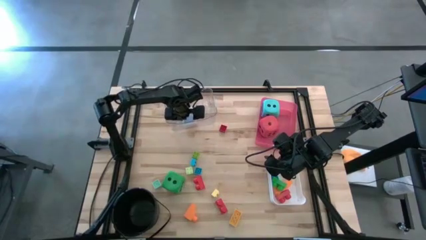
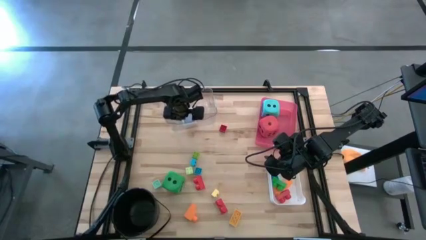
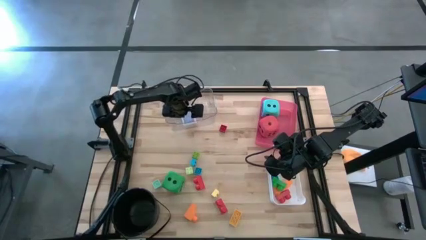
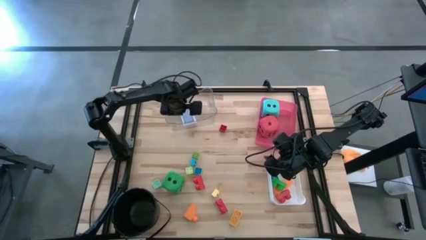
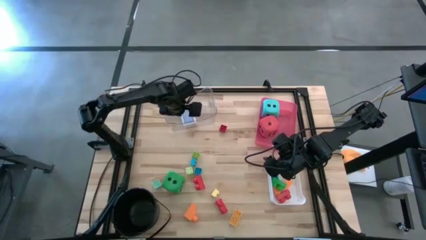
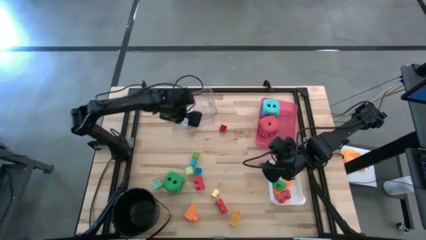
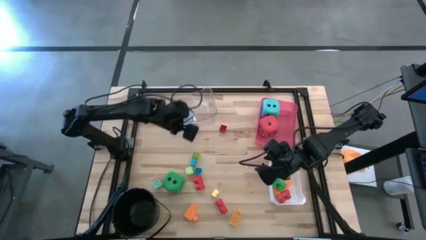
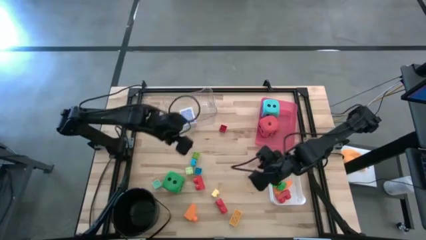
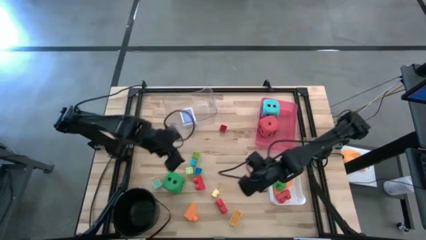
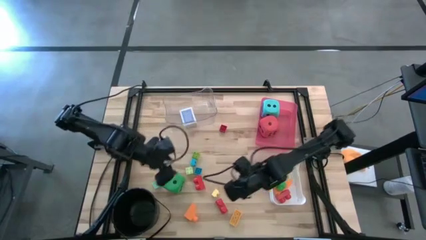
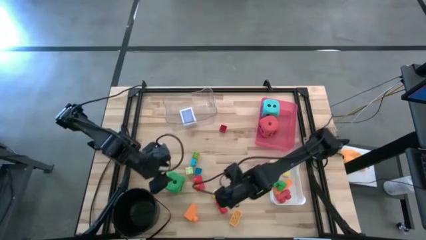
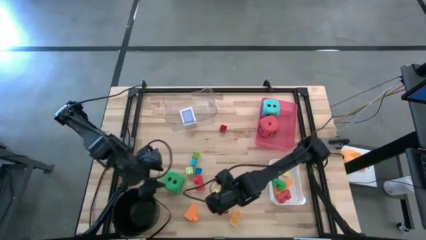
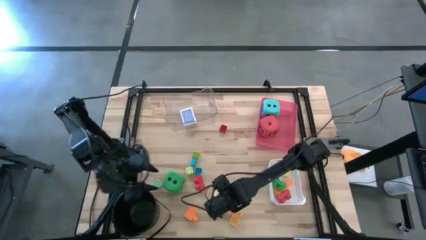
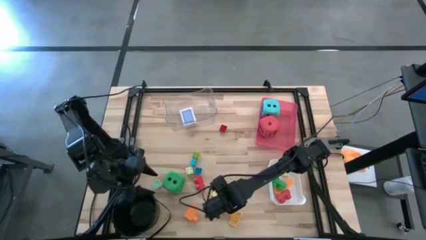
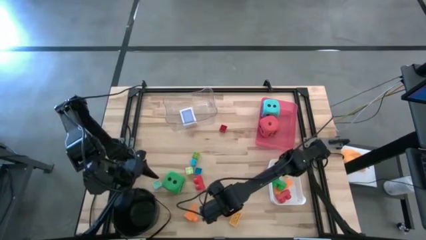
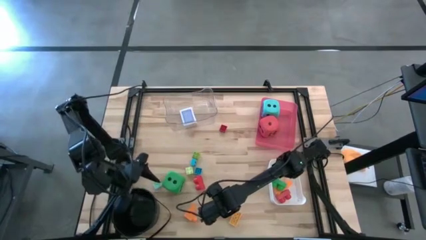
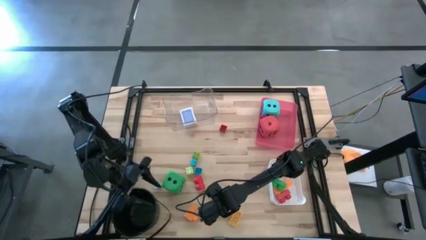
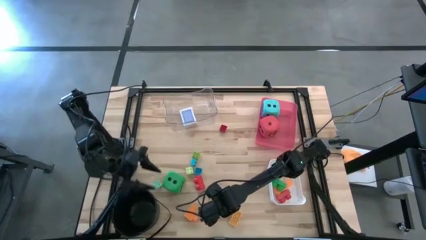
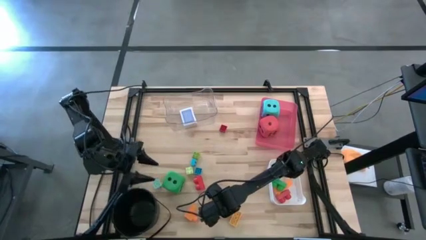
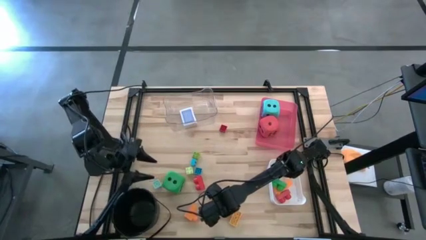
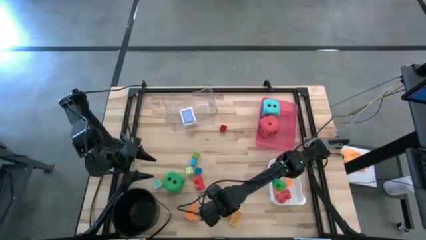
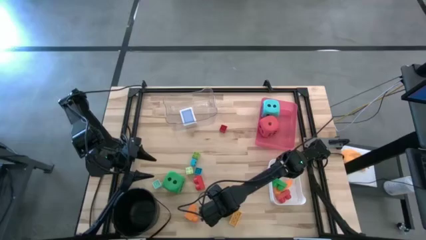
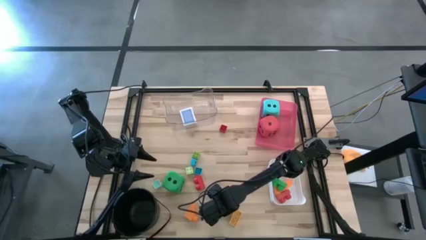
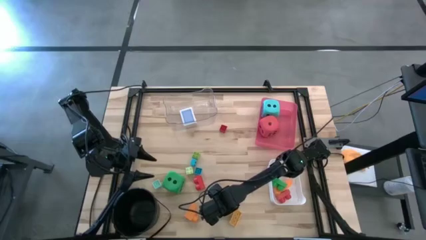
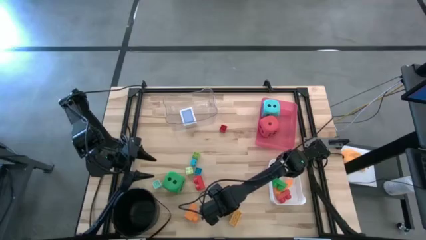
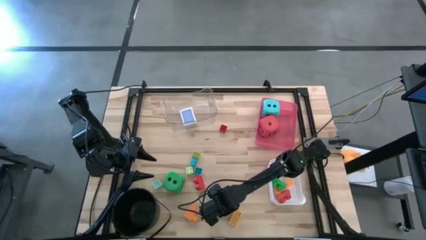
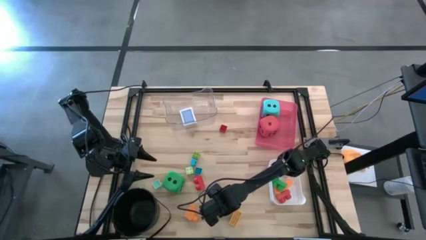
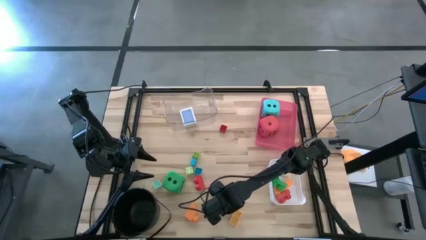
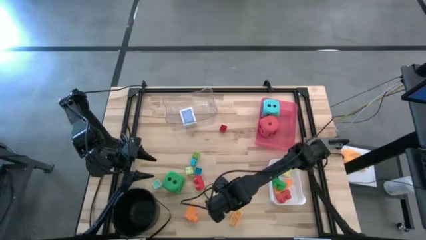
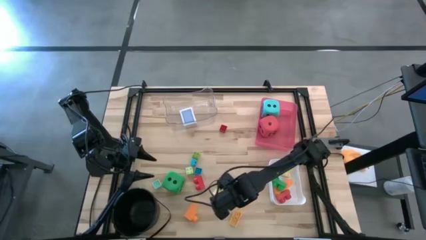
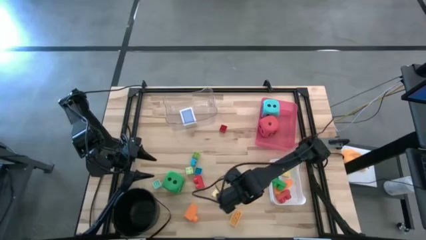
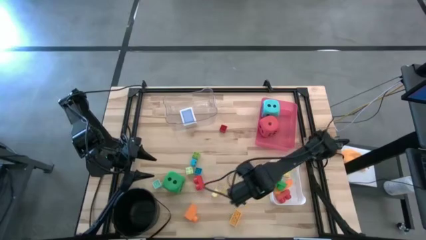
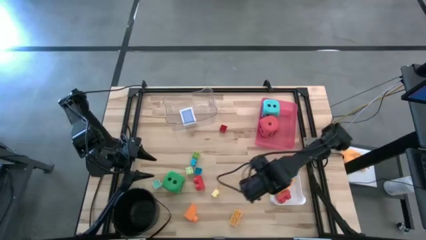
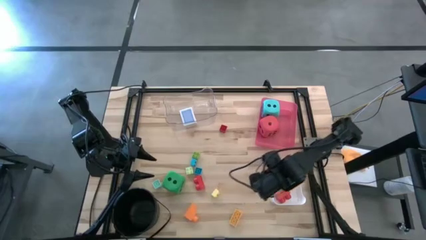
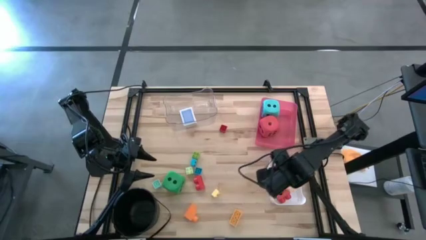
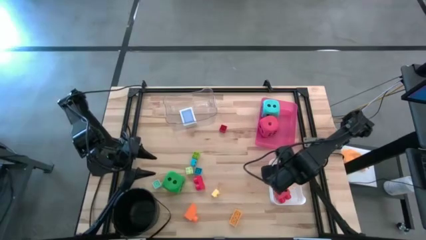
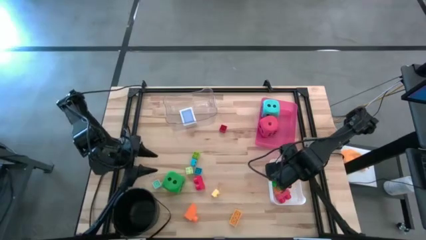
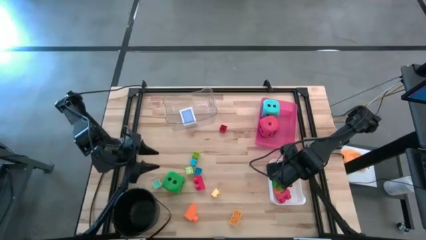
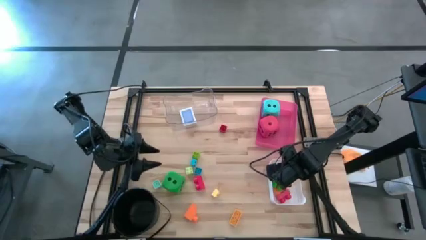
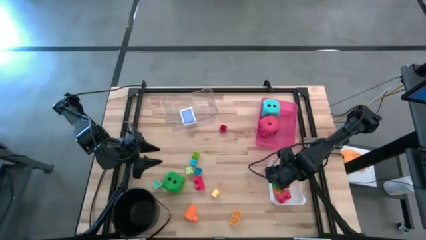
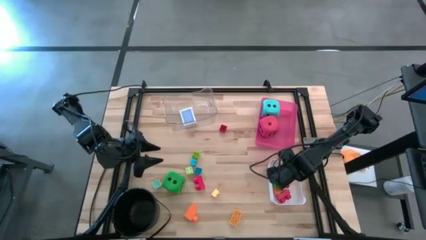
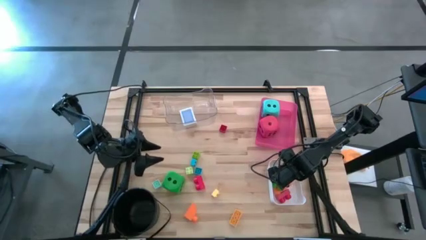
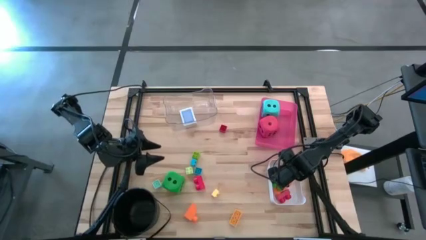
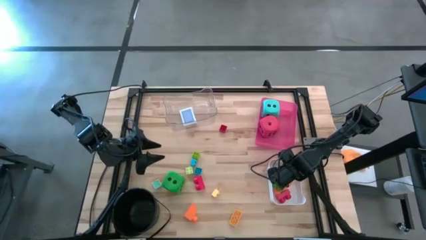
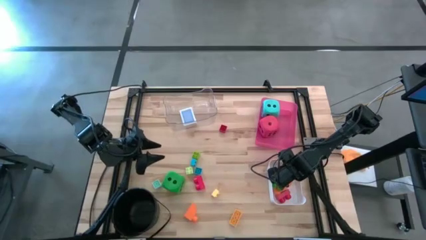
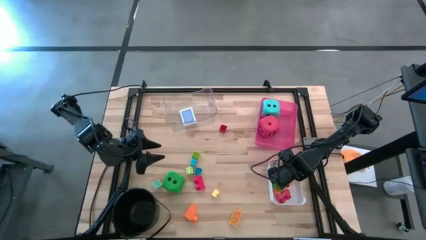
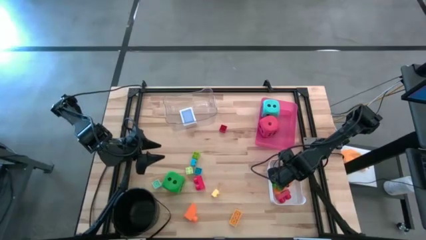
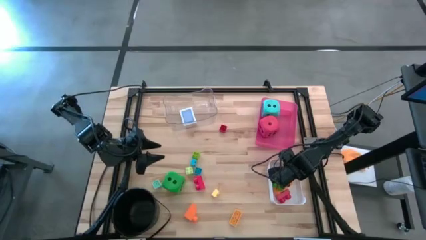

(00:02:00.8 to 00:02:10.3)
Task: Pick & Place Toys
Put the red game piece into the white bin

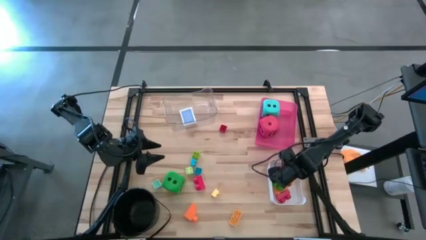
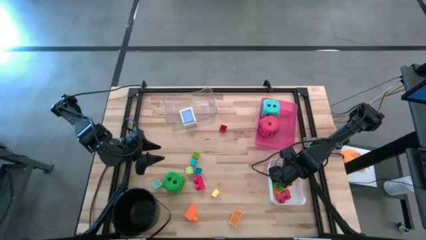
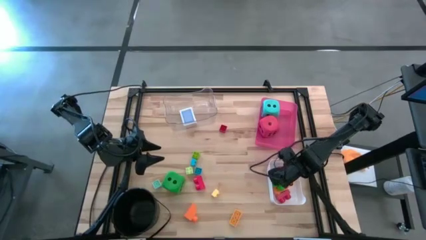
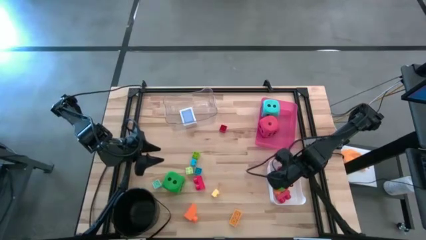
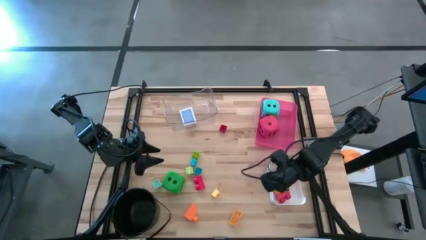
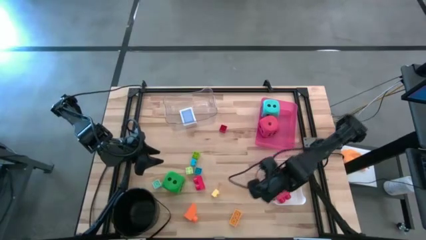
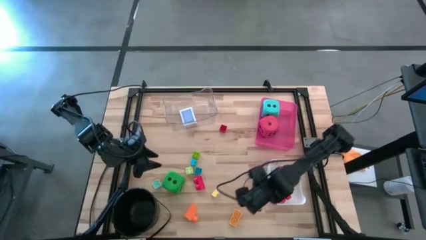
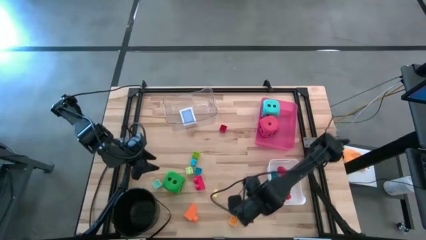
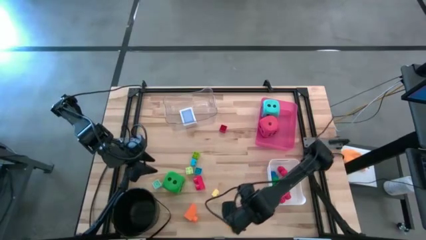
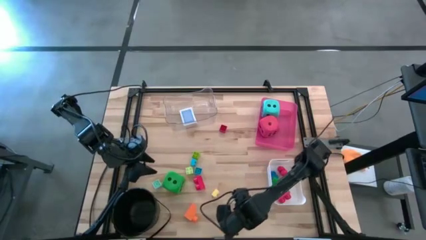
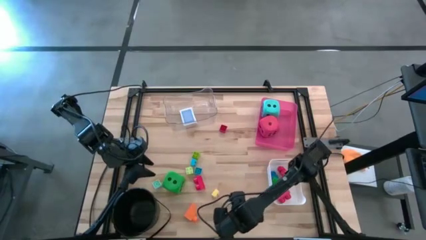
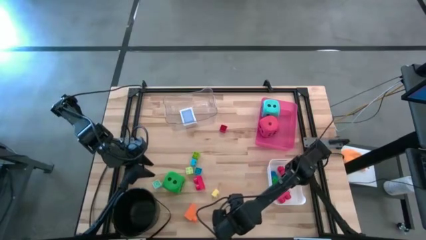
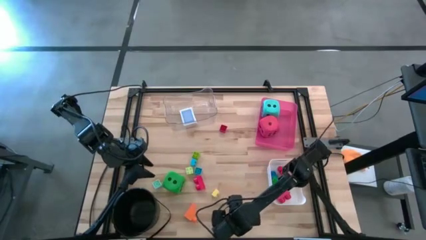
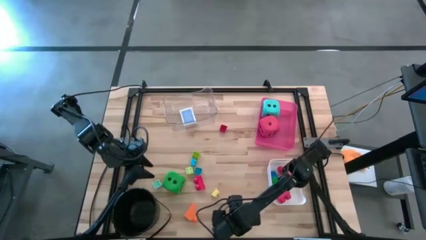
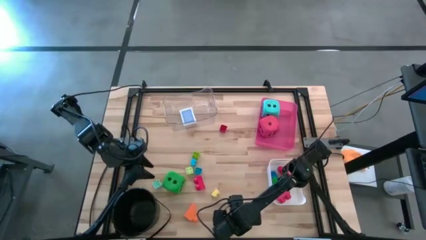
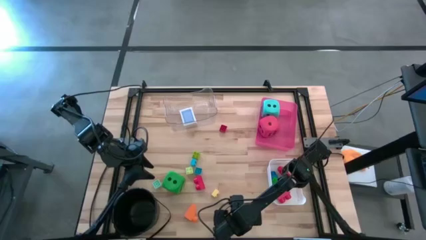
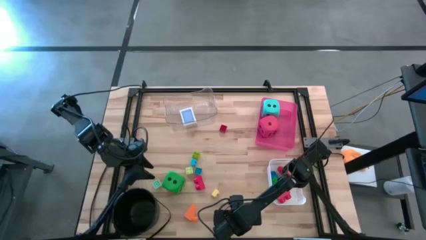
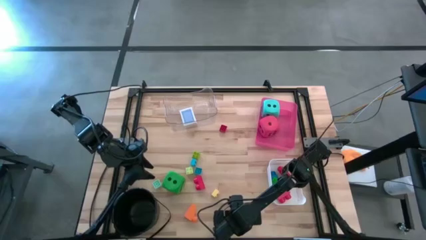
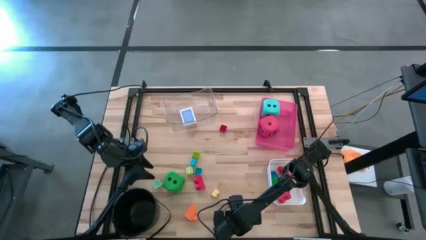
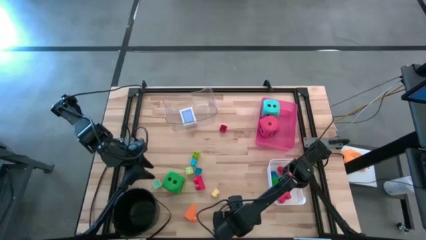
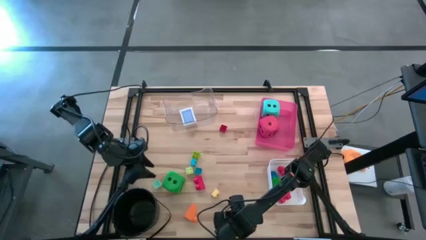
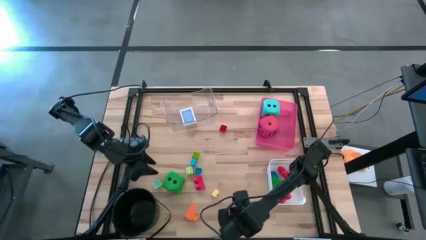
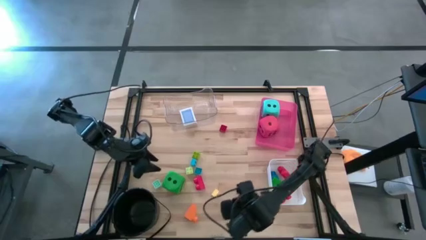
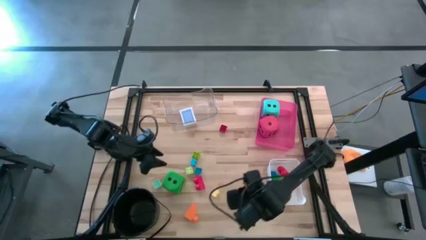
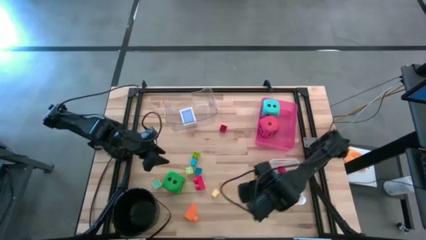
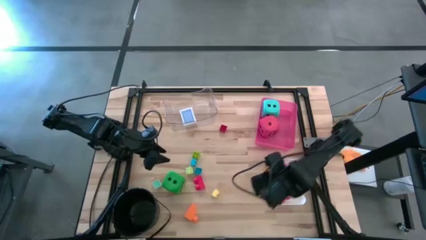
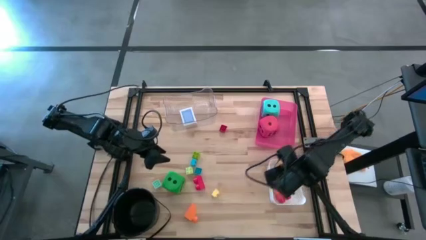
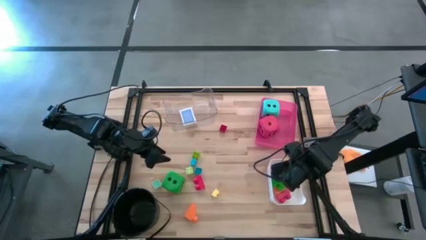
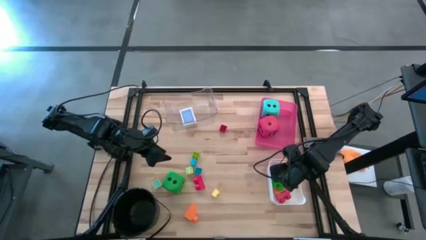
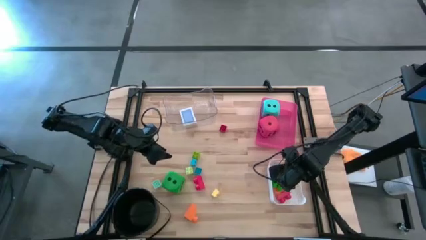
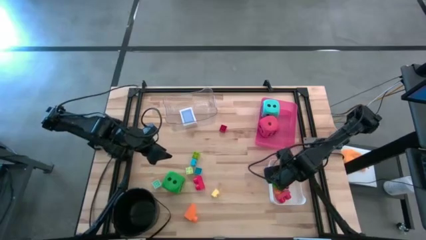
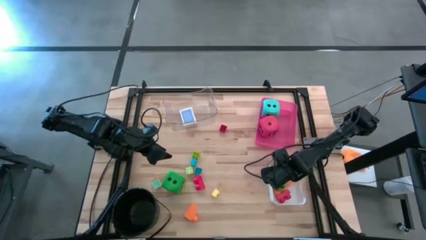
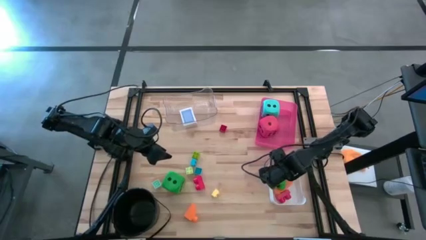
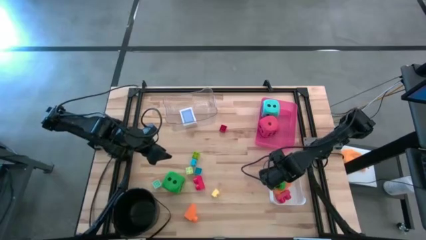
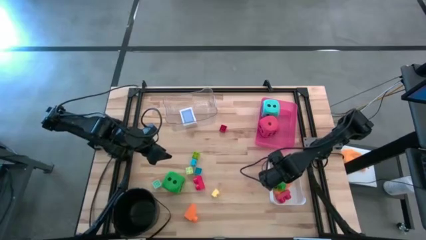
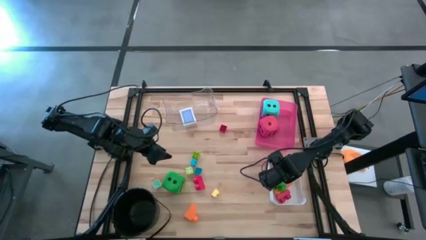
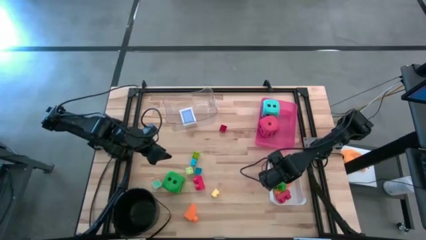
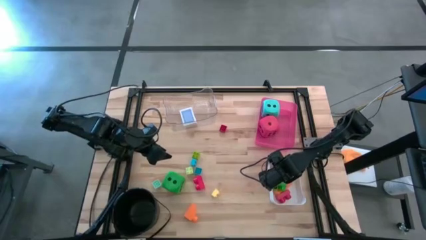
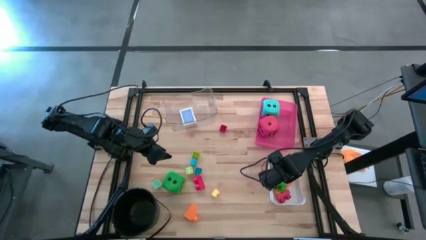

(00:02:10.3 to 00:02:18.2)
Put the yellow game piece into the white bin
